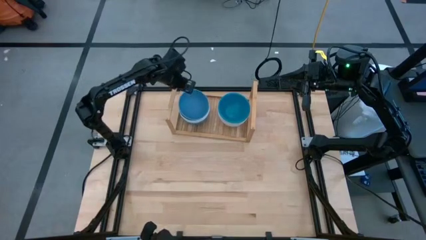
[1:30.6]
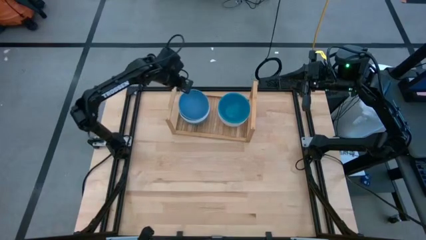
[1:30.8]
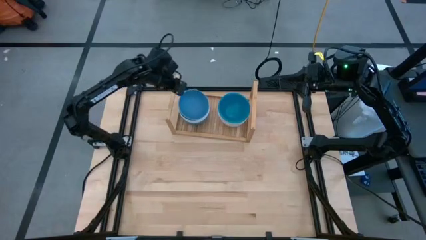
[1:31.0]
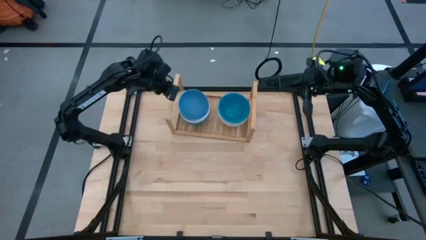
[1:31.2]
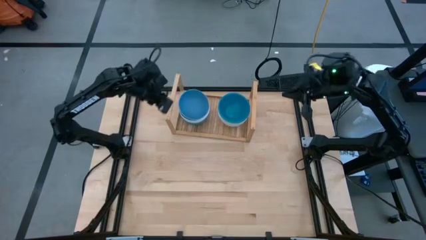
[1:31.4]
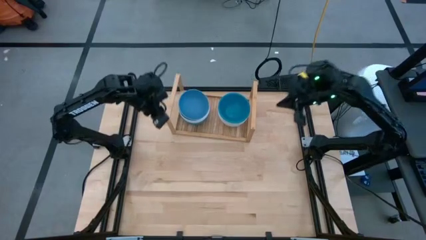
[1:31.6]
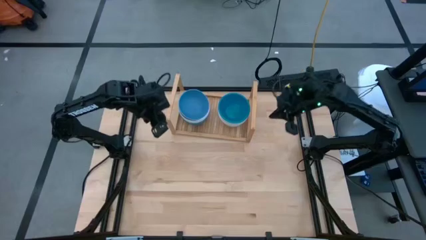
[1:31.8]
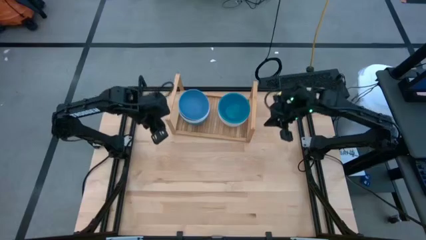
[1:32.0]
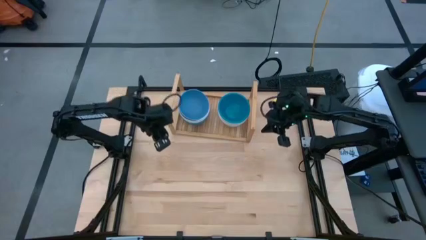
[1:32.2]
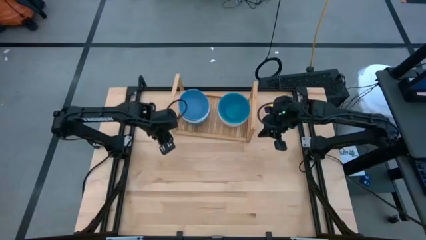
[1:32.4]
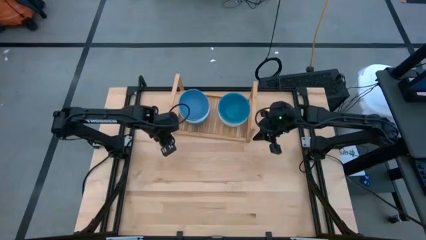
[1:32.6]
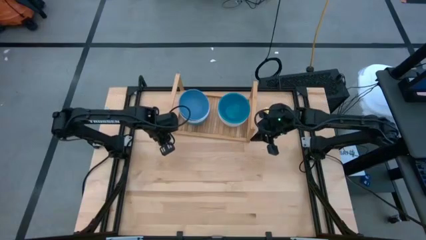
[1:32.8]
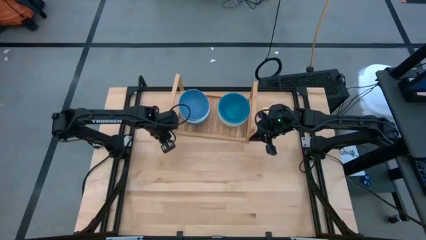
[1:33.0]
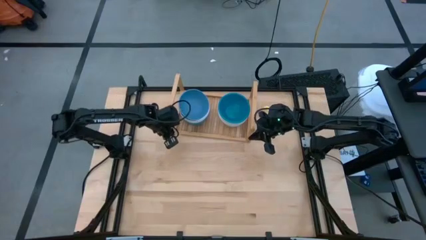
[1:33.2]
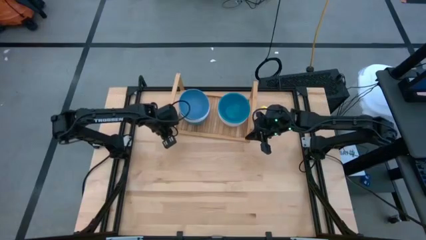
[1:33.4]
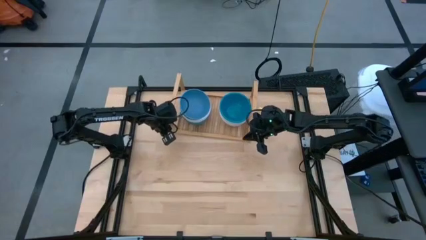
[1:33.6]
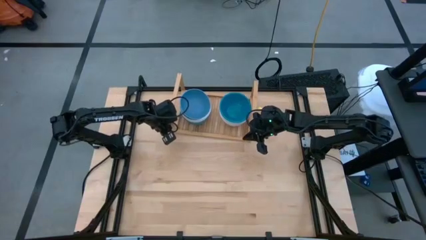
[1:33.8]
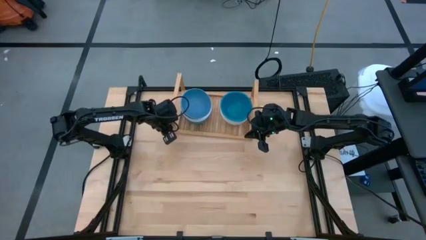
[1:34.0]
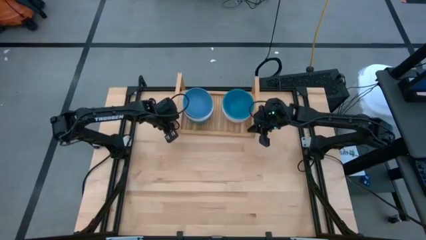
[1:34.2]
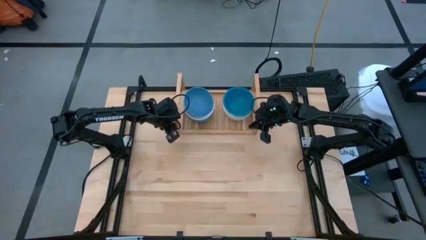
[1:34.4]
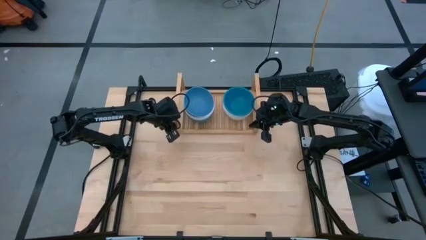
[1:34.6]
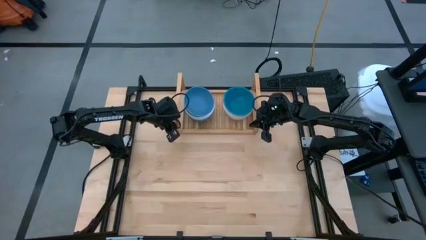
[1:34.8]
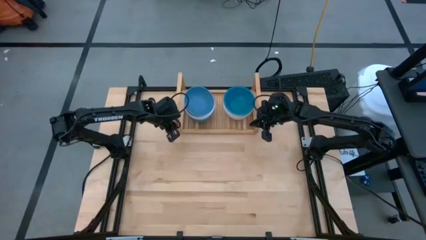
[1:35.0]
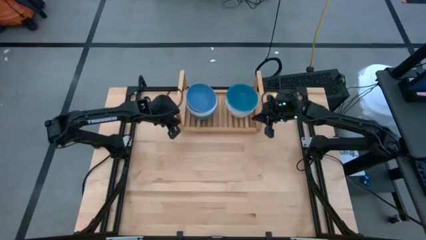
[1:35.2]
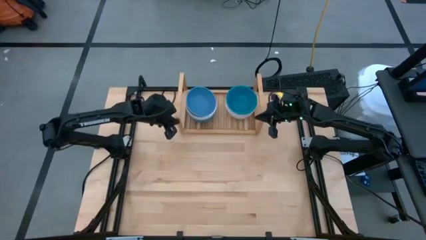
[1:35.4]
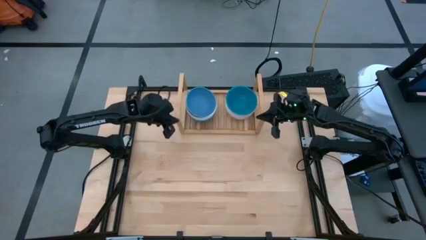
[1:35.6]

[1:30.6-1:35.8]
Task: Place and stack bowls onto a shelf
Adjust the shelf

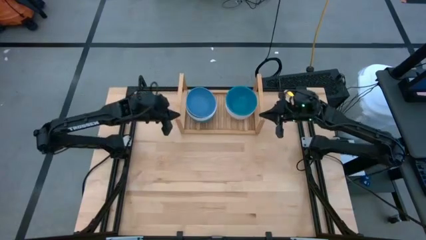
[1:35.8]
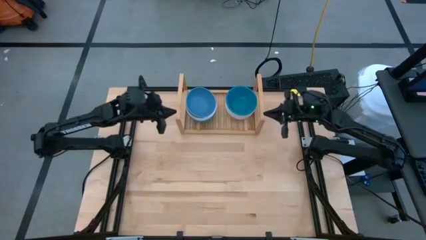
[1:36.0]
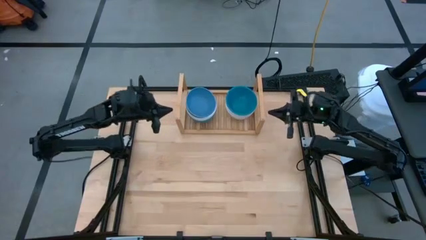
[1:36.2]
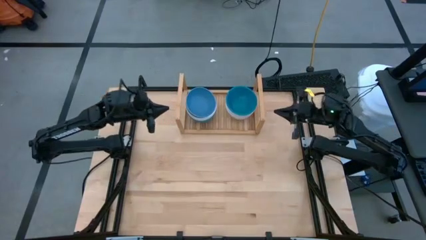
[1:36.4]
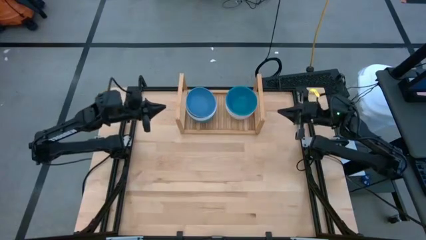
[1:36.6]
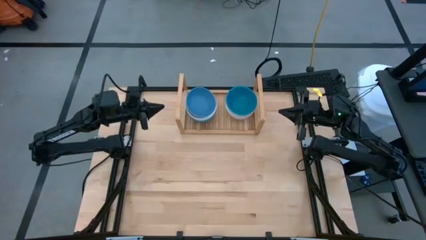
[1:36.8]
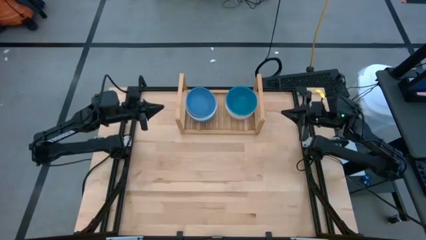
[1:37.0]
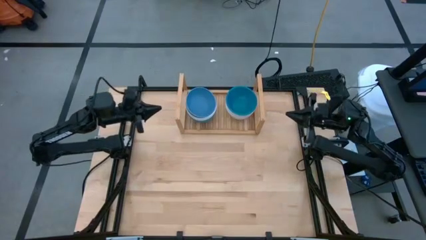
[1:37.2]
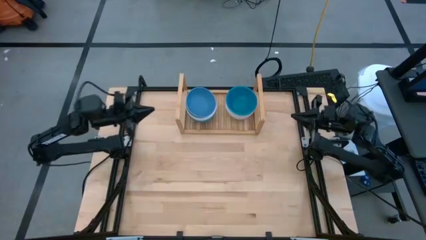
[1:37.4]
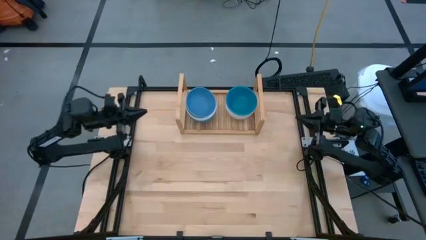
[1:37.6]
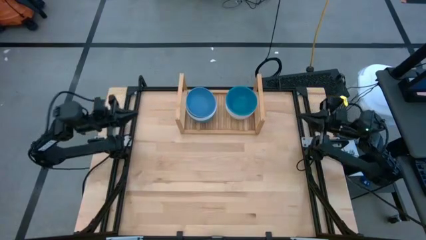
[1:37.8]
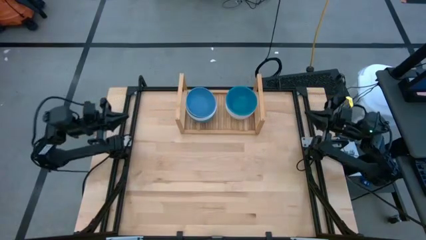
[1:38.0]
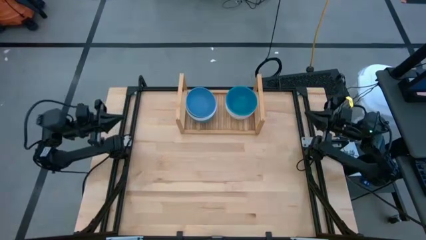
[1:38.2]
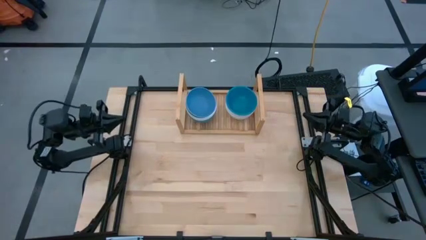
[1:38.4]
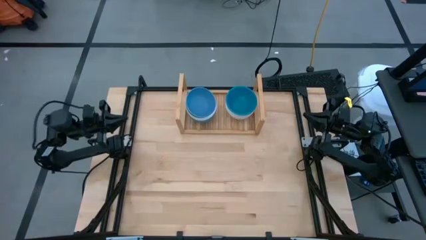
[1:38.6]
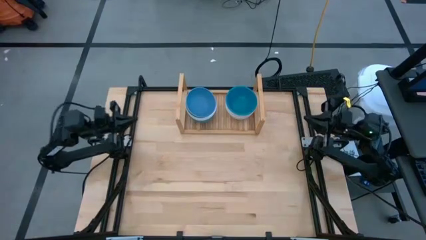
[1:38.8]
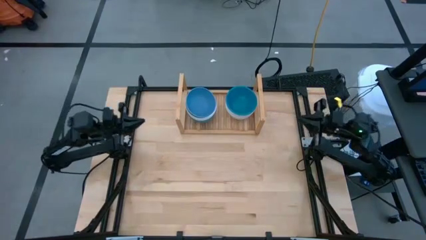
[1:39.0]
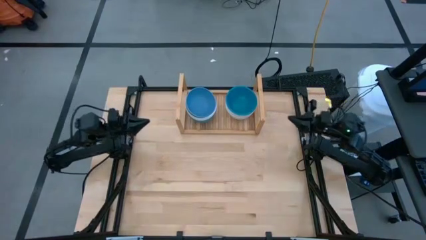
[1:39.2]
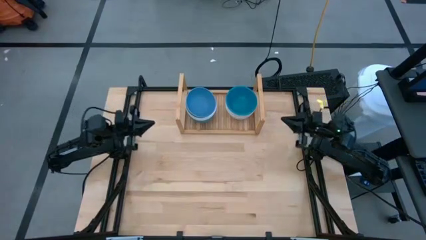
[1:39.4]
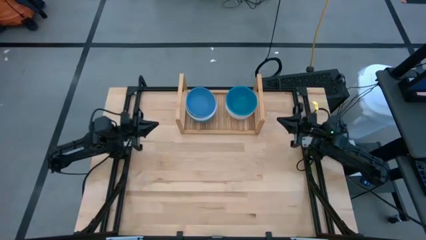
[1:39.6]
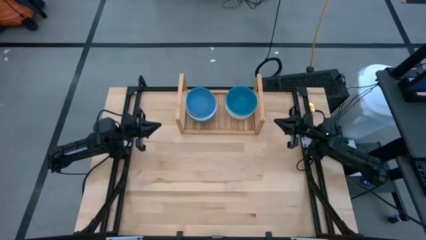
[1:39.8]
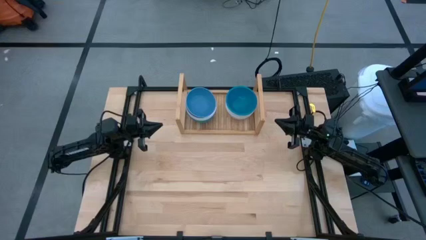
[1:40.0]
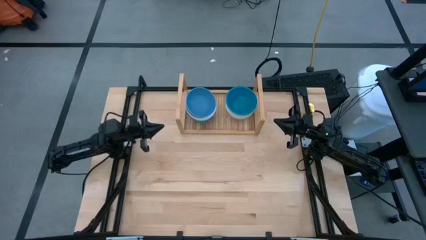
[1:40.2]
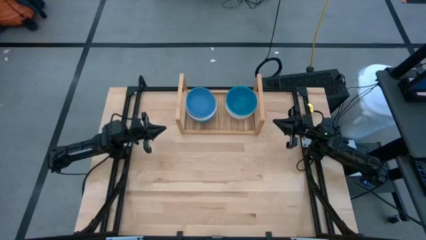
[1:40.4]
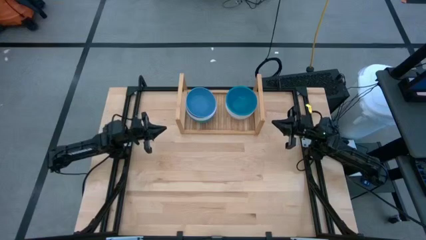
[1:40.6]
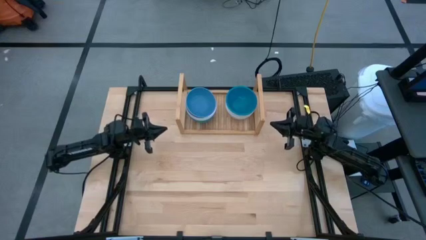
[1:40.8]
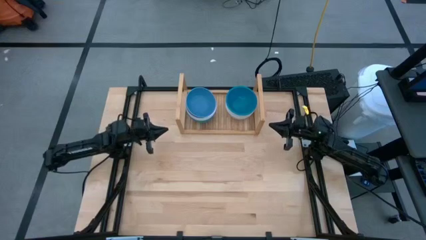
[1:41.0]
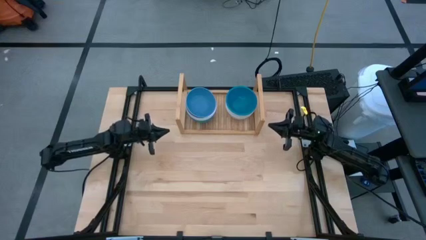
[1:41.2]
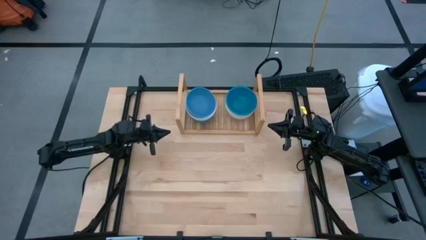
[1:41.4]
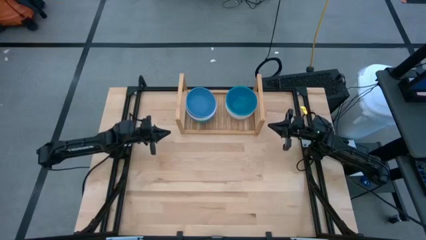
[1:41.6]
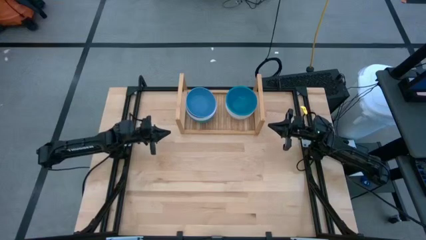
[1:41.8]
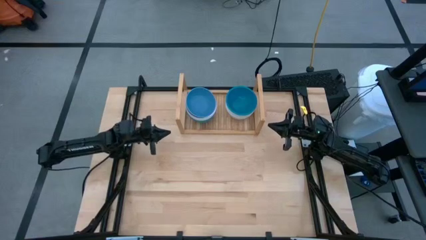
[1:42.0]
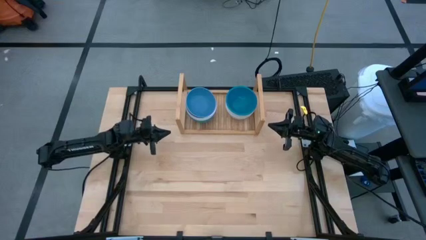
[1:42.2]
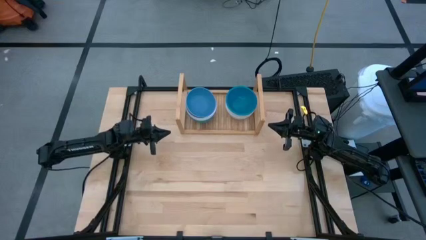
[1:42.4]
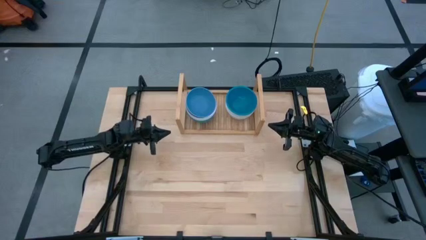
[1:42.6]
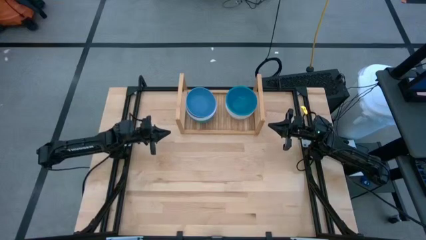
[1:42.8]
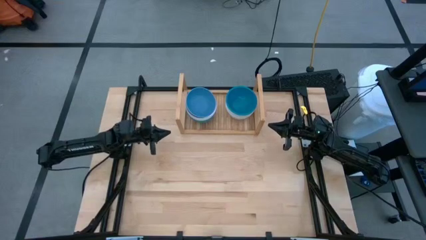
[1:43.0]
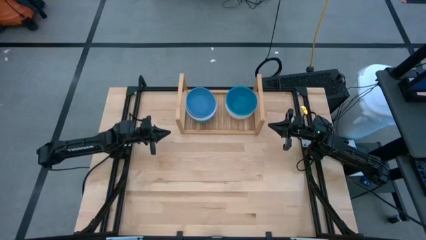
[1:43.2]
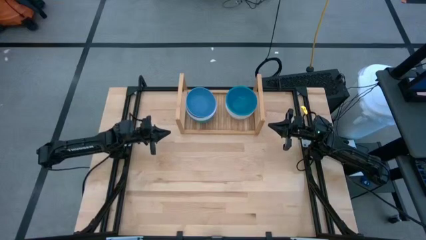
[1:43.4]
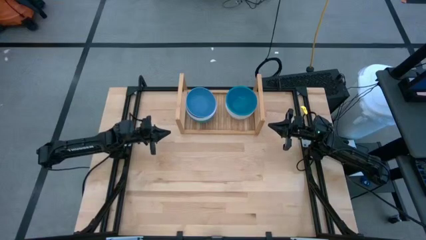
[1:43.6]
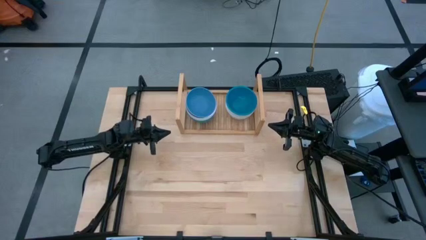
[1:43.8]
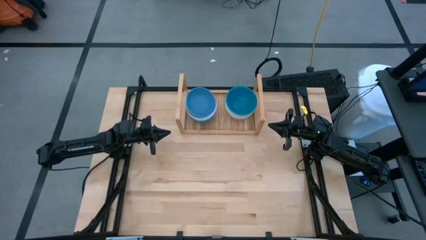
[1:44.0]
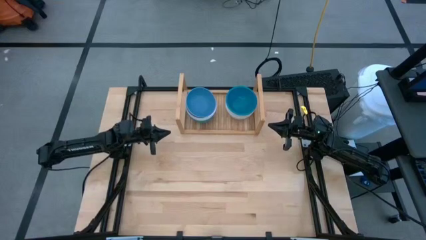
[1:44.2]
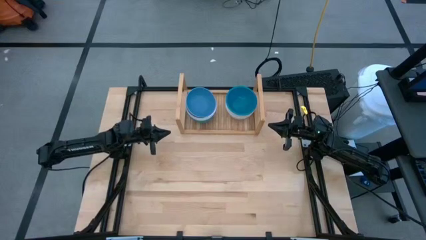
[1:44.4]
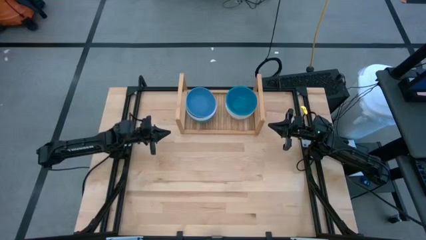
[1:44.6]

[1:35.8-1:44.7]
Return to Home Position

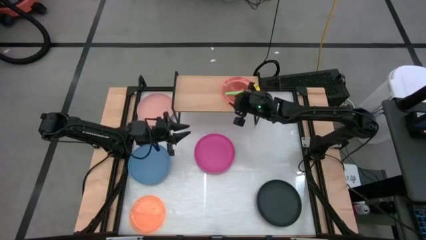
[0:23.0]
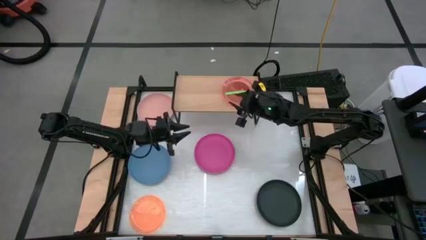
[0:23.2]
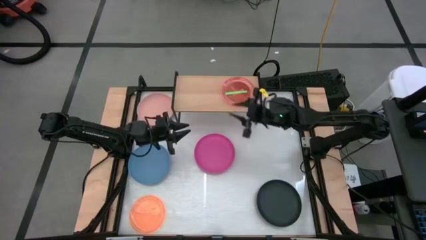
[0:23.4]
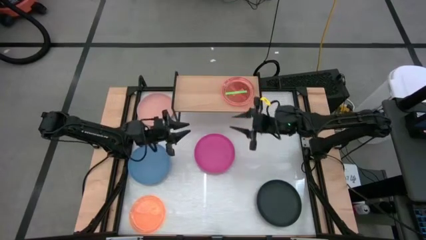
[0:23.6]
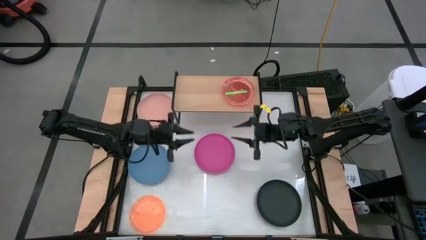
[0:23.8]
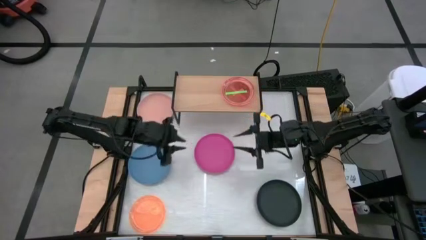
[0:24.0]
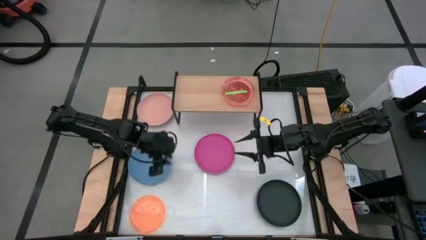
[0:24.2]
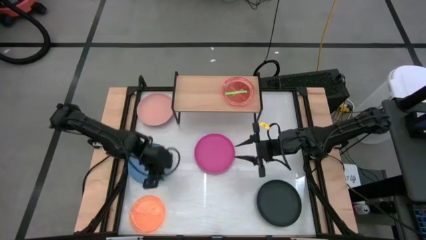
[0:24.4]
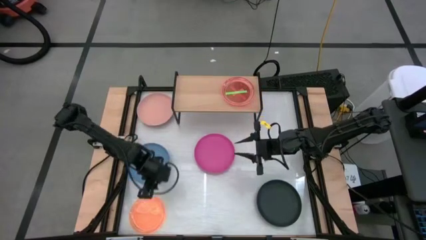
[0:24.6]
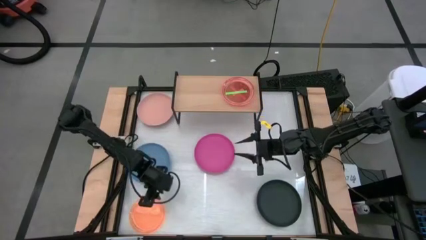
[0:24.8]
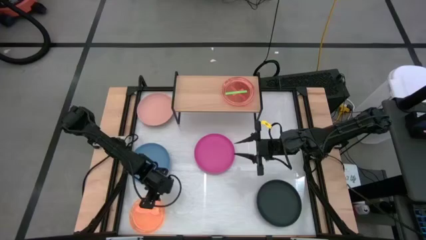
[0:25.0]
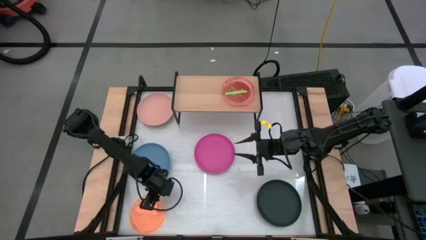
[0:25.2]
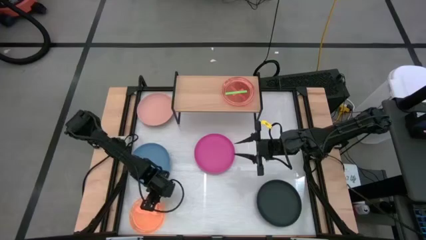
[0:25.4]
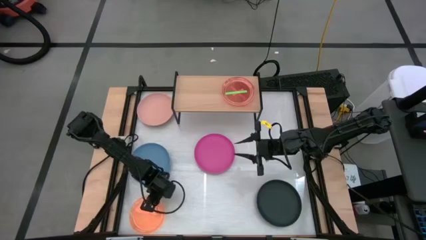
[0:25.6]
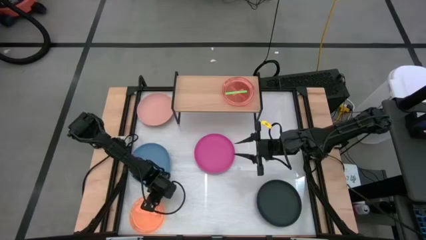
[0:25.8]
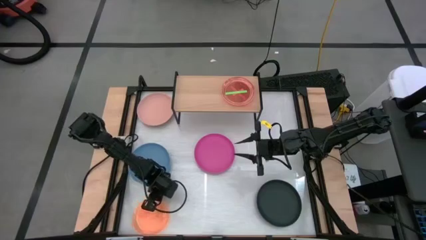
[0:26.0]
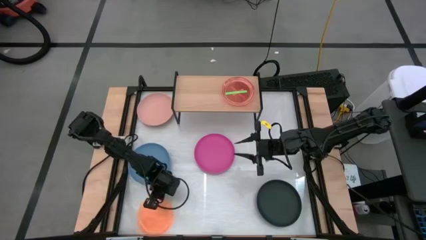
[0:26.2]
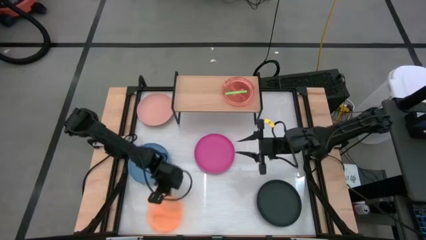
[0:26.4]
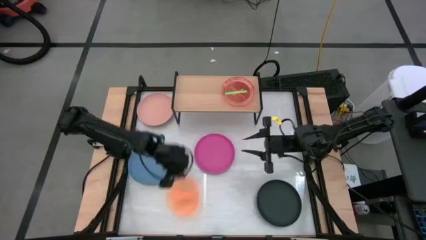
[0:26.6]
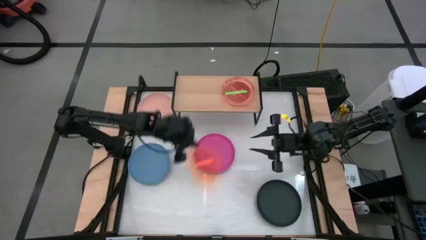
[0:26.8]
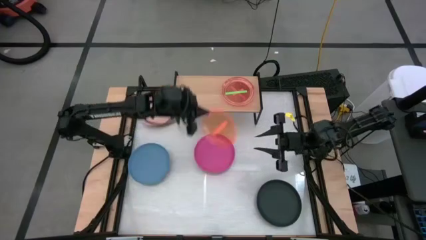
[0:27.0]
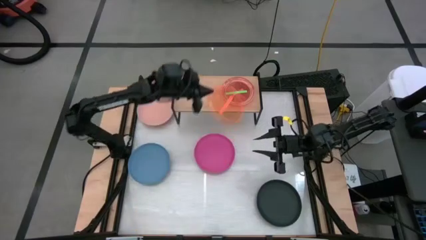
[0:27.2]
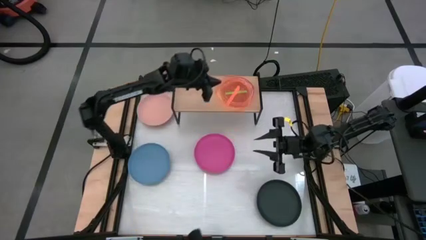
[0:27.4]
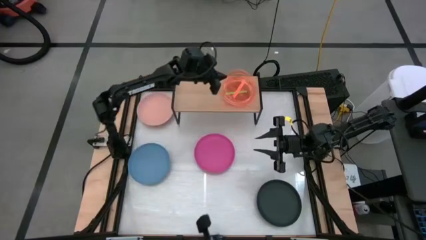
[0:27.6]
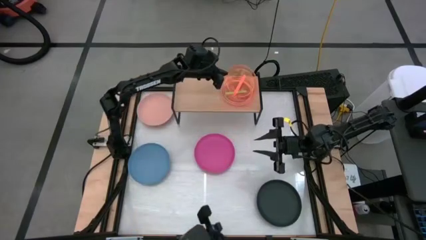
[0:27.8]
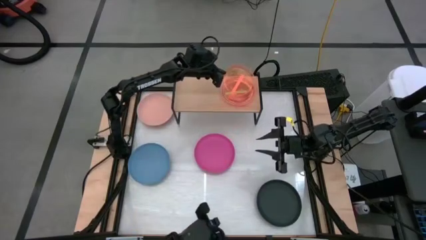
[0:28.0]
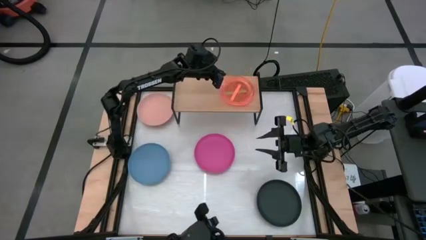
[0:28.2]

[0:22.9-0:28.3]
Task: Place and stack plates onto a shelf
Stack the orange plate on top of the green plate on the shelf
